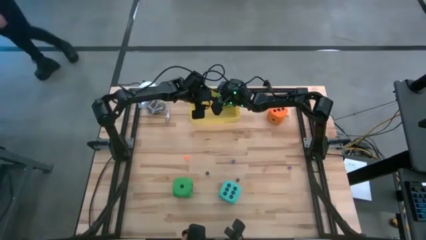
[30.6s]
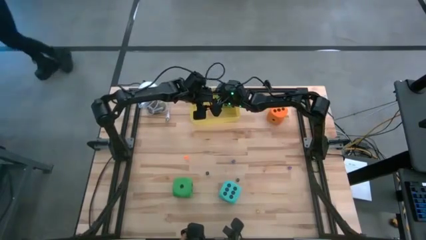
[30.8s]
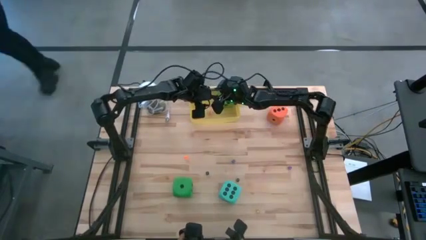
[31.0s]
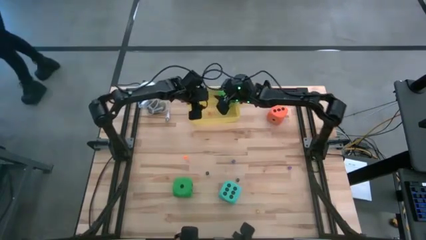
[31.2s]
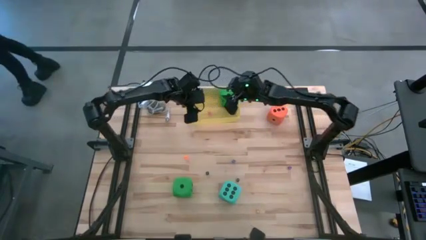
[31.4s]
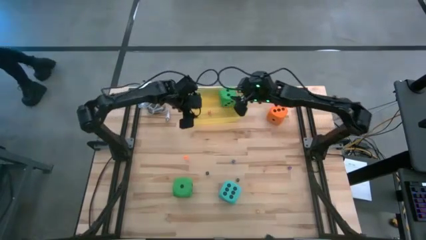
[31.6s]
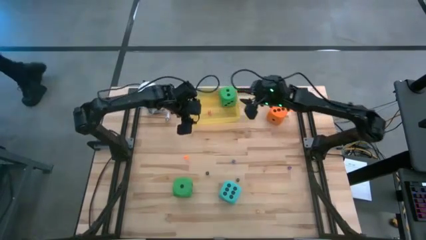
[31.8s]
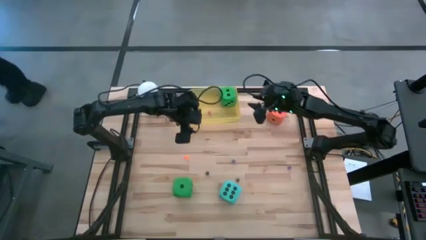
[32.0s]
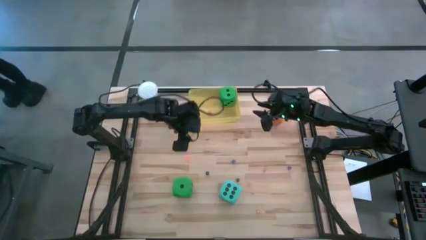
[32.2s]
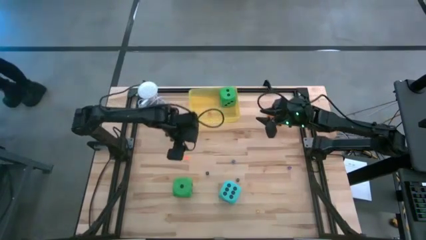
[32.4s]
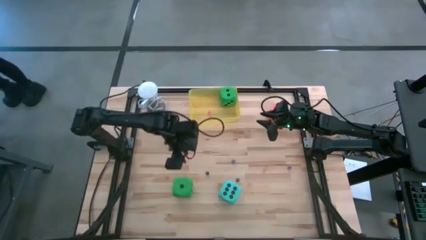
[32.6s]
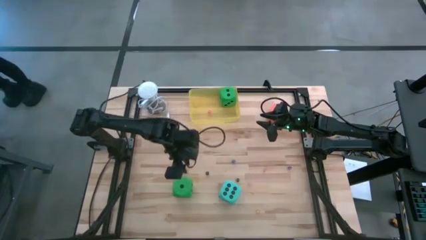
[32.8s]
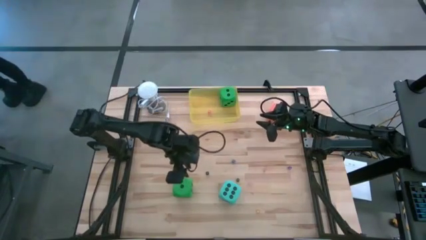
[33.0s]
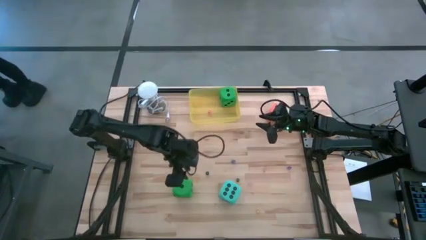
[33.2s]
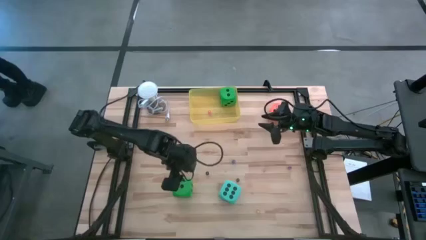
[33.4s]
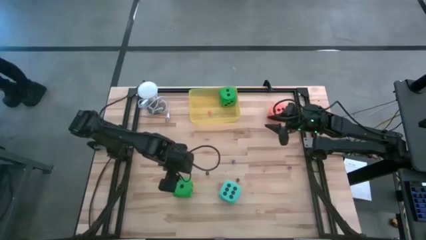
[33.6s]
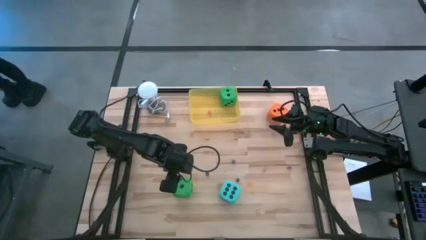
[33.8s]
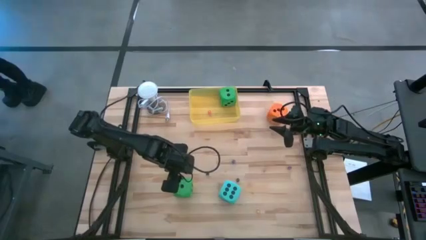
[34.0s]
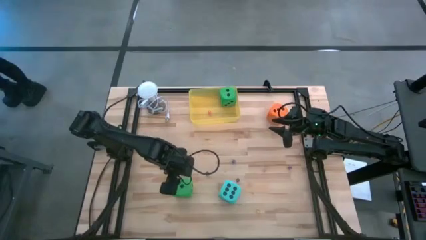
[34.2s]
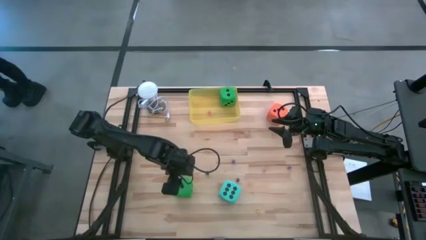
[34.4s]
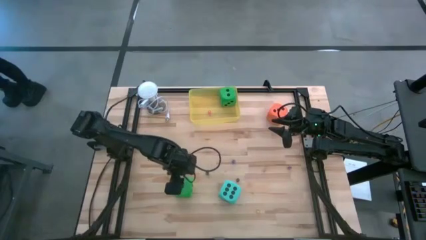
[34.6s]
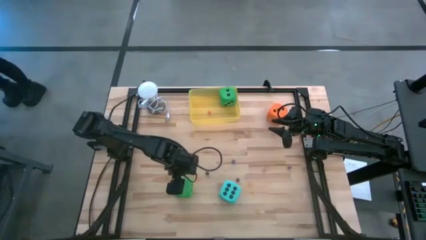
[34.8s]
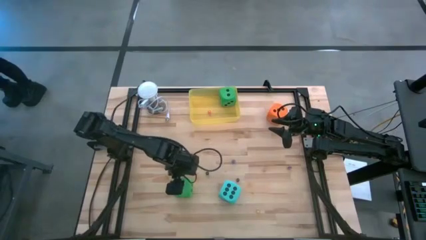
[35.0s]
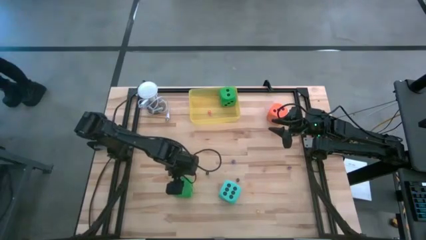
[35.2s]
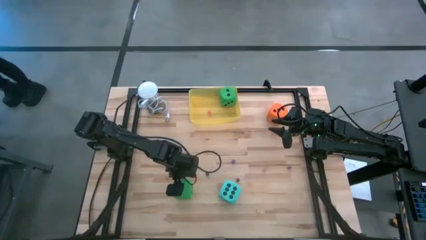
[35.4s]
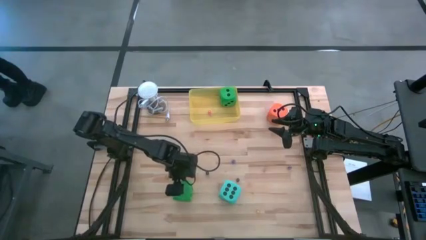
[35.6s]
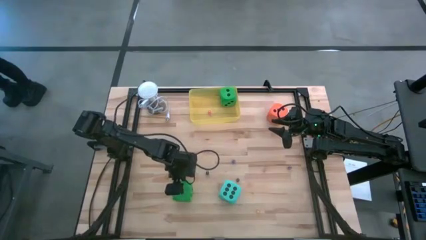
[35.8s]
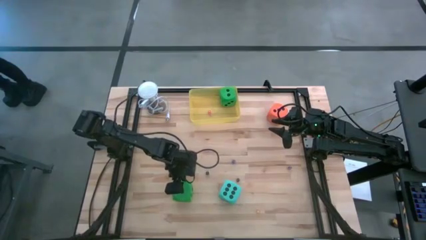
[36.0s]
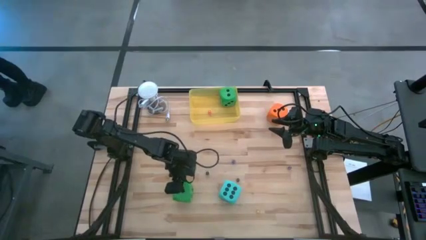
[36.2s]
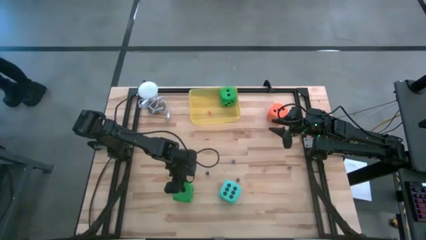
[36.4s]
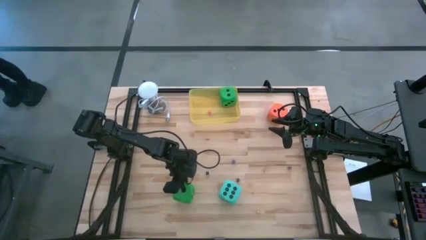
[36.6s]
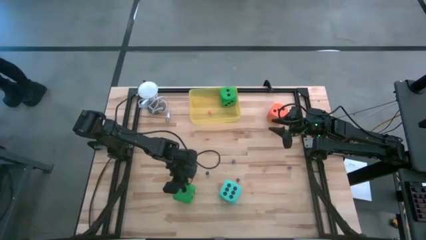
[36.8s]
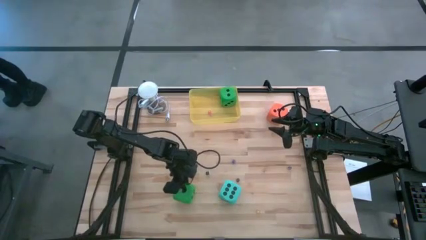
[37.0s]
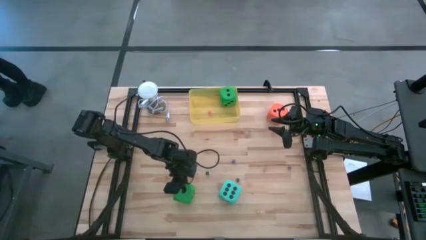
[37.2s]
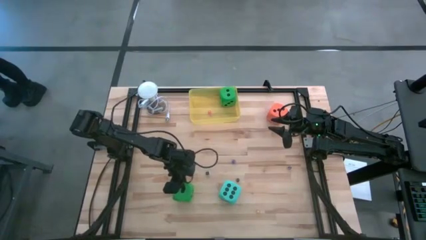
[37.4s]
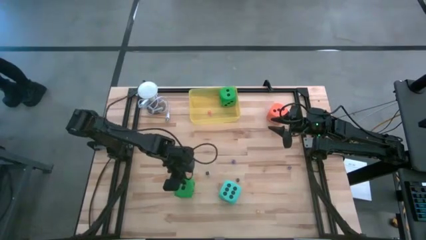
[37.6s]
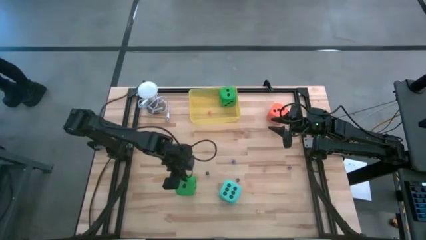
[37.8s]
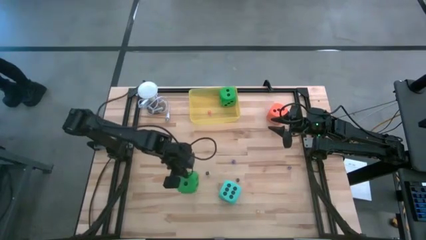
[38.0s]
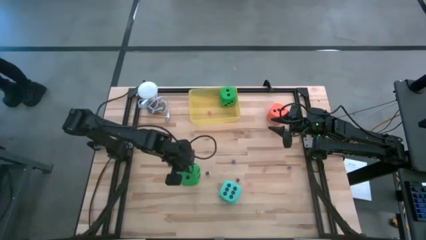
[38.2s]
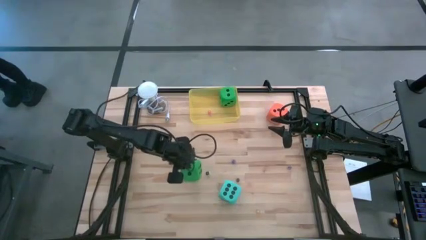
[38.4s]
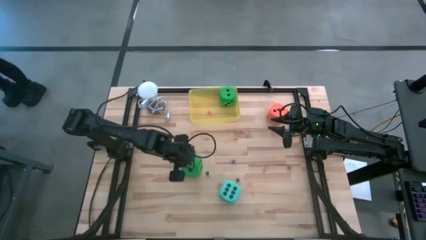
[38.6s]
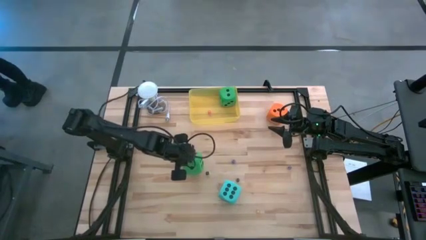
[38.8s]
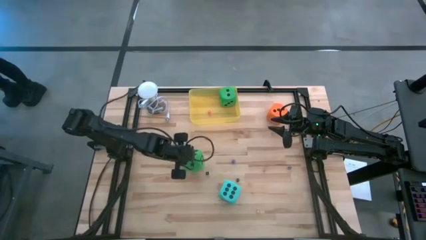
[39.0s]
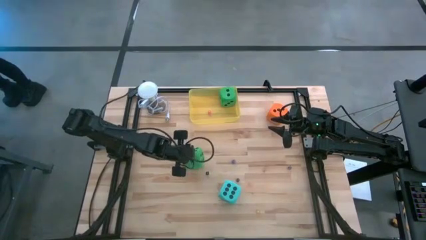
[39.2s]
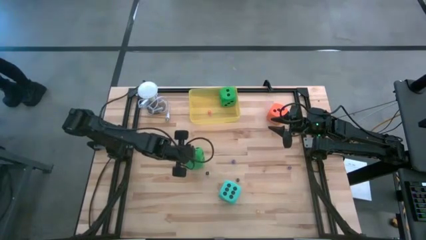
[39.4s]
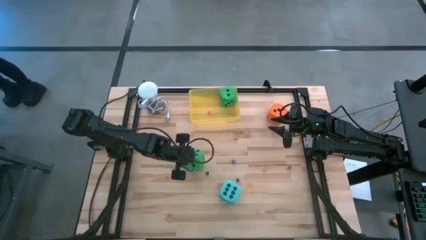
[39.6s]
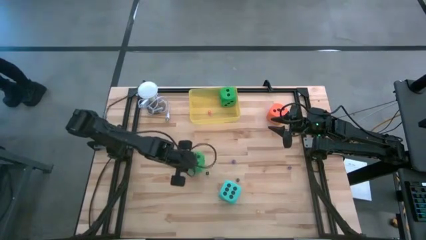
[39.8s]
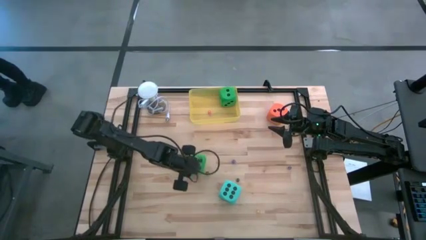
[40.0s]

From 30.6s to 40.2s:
Task: Pick & Place Dice
Put the green large die into the yellow bin

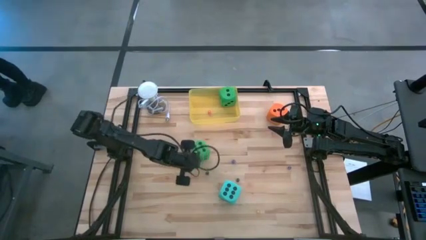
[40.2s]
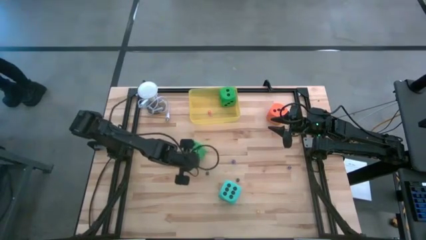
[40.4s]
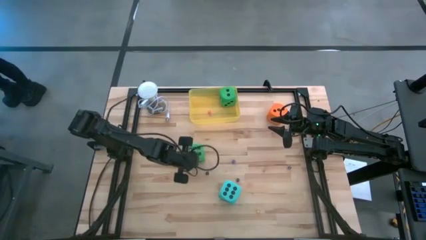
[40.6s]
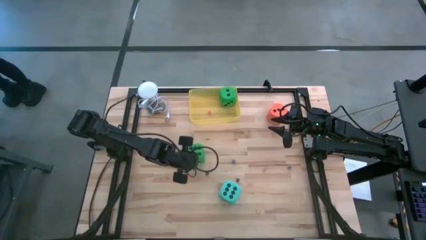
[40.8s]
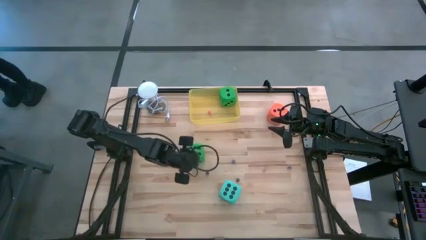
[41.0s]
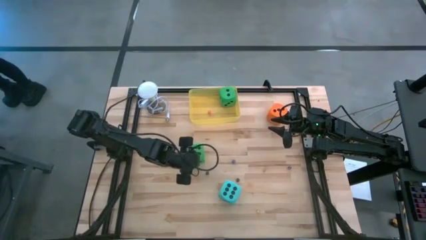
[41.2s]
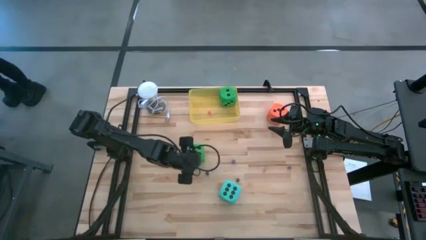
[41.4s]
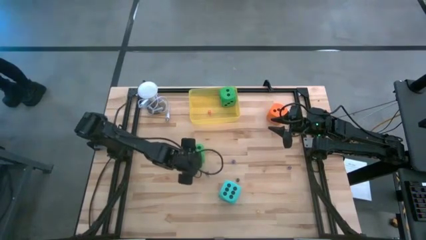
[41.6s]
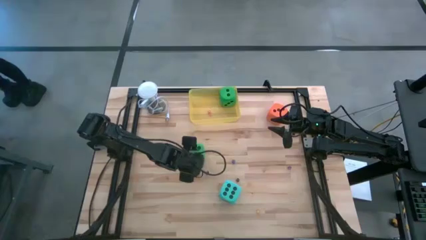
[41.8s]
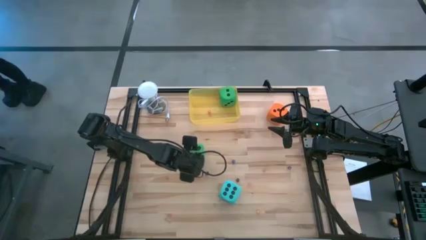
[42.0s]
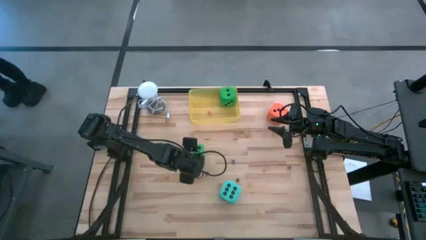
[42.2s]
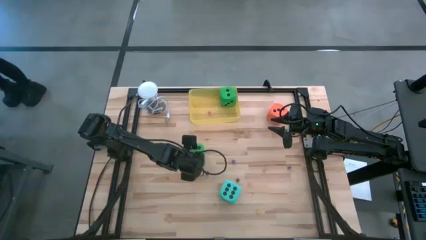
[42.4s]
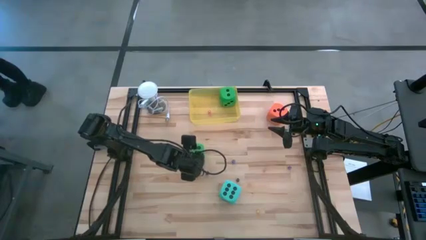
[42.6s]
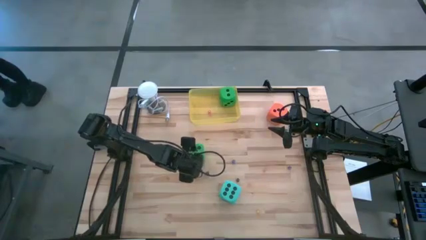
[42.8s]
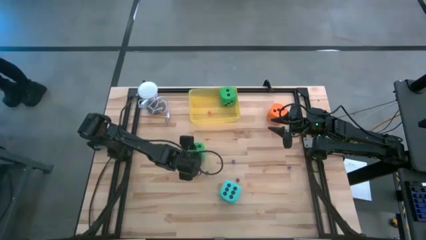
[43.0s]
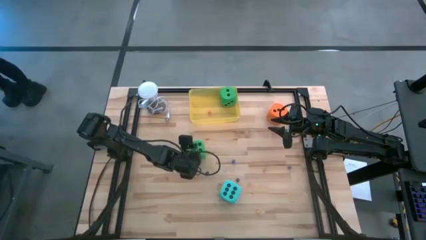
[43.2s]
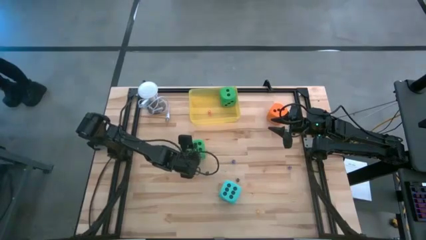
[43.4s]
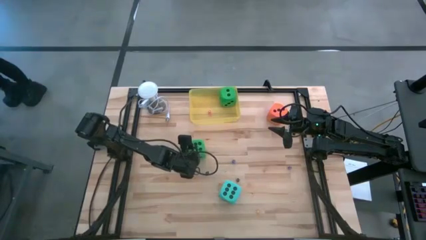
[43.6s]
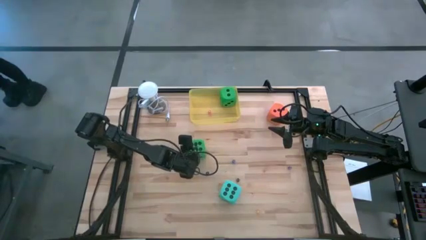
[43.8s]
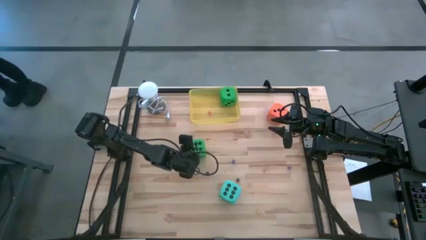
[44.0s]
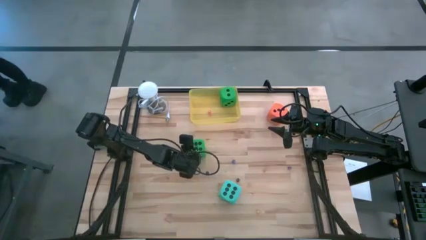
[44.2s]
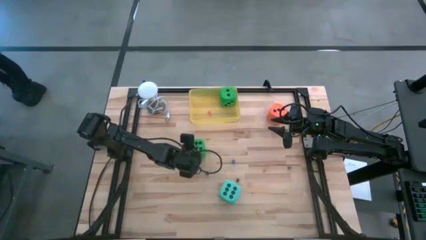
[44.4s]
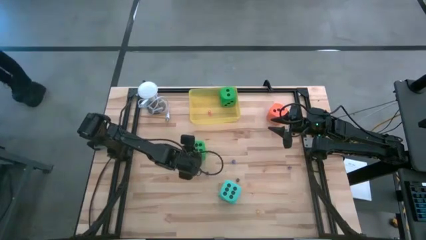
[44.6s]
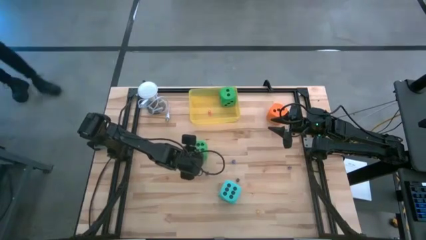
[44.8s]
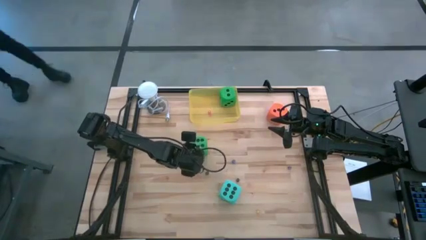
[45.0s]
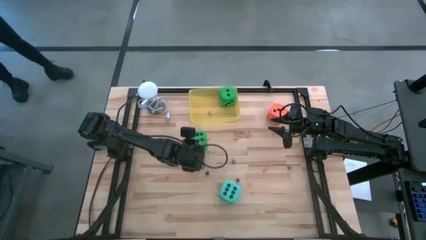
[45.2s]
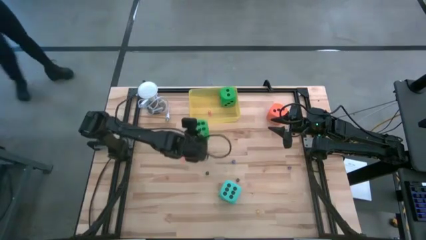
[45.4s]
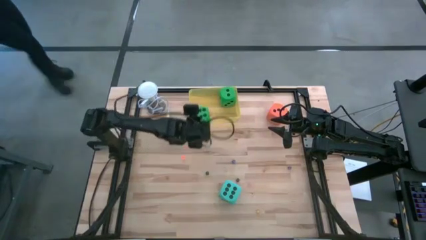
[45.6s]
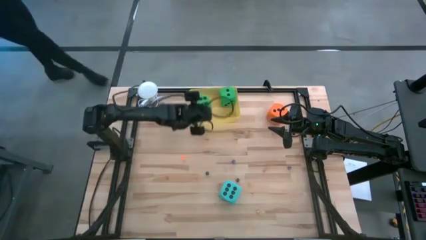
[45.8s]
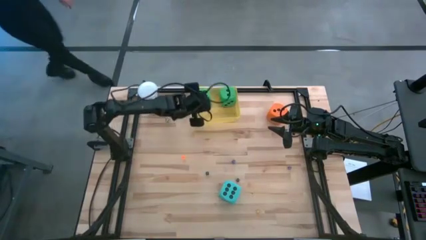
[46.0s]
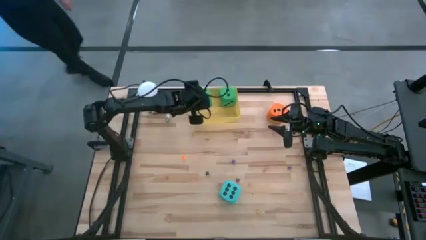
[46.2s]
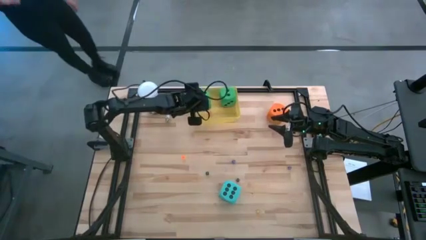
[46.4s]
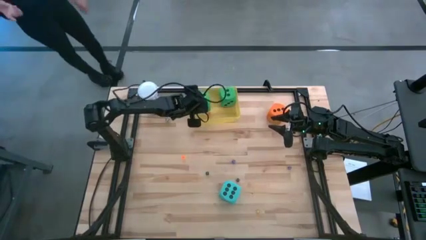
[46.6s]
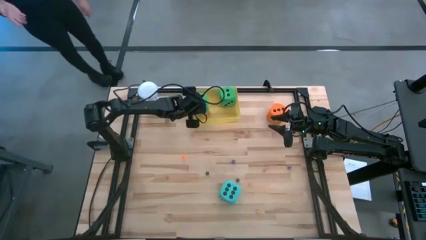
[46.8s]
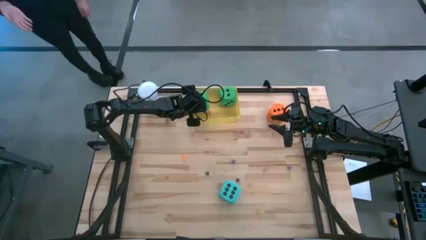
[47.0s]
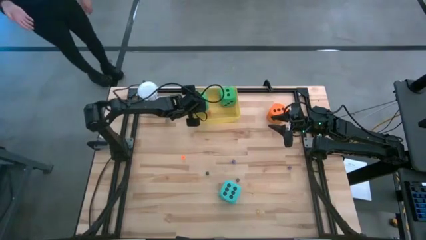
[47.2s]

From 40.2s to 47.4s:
Put the green large die into the yellow bin
